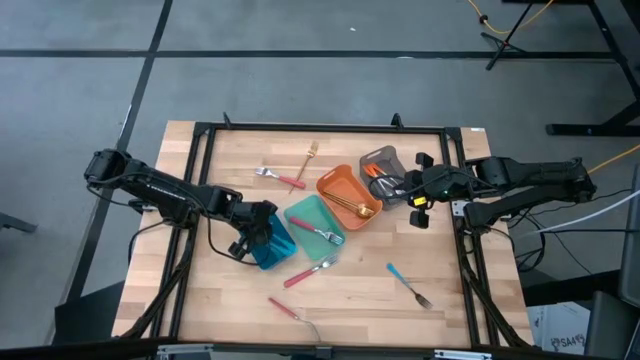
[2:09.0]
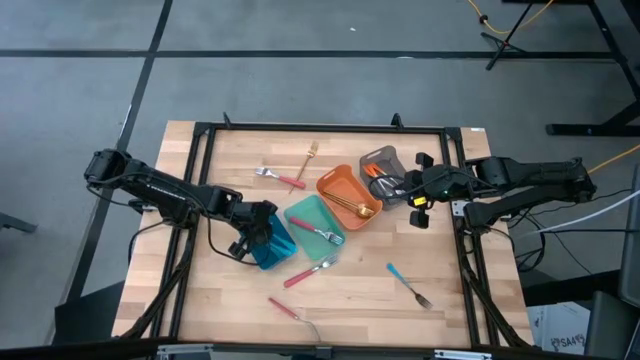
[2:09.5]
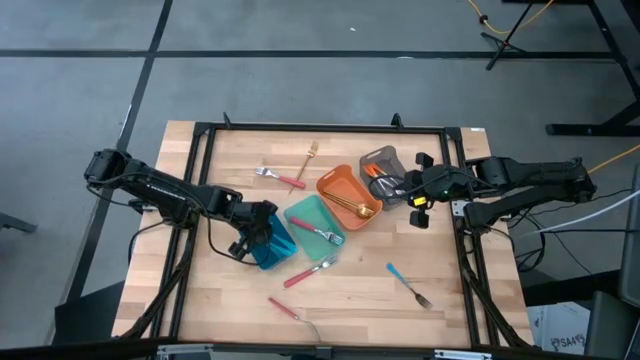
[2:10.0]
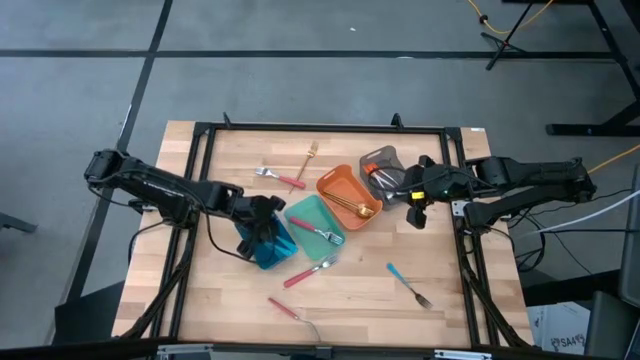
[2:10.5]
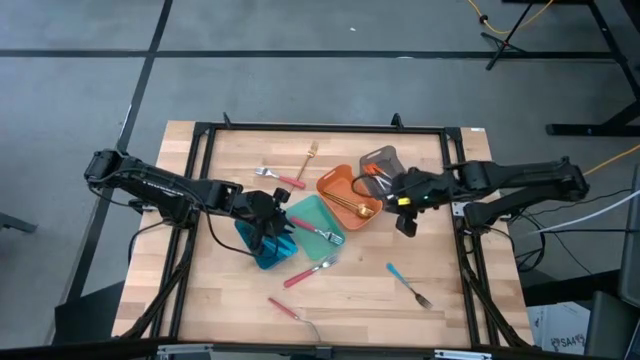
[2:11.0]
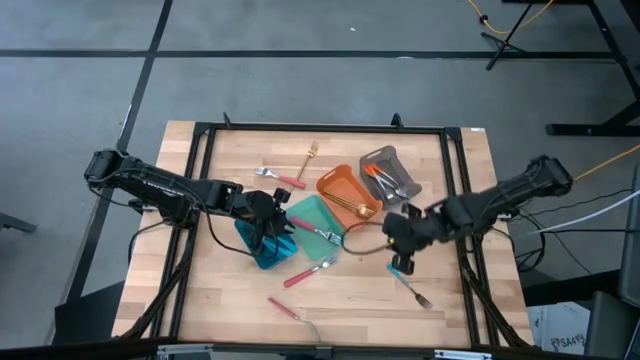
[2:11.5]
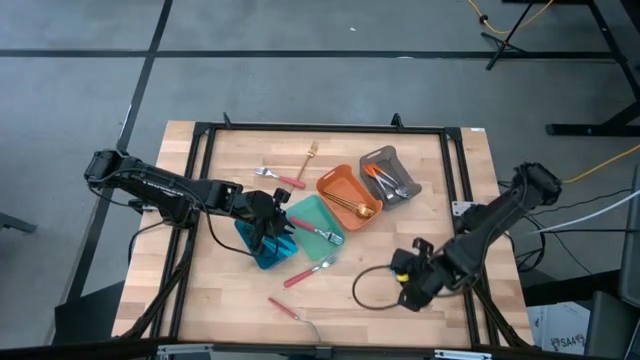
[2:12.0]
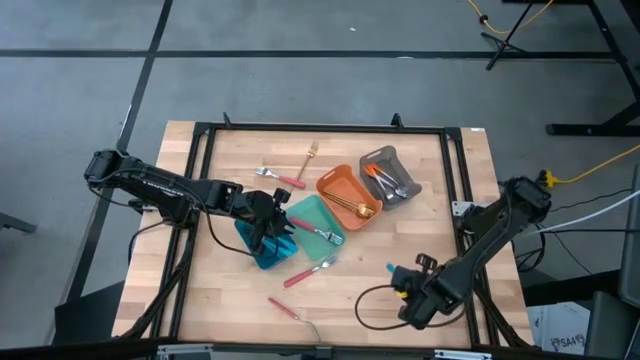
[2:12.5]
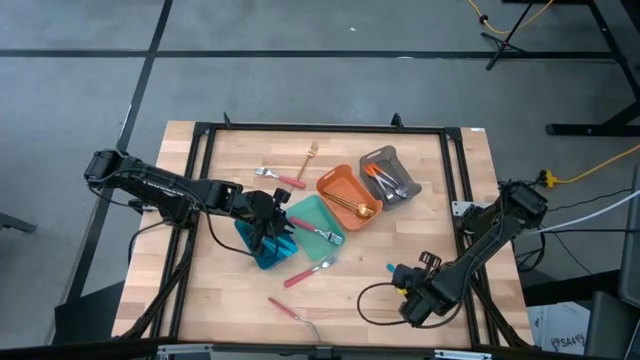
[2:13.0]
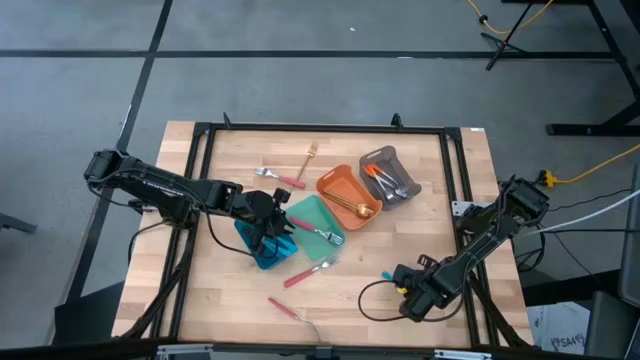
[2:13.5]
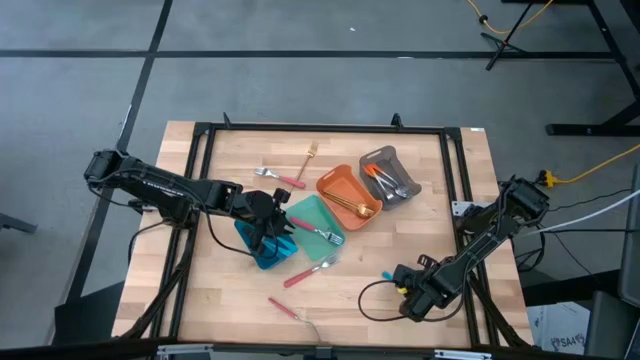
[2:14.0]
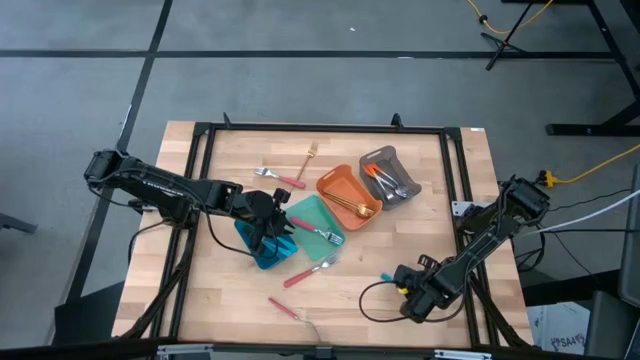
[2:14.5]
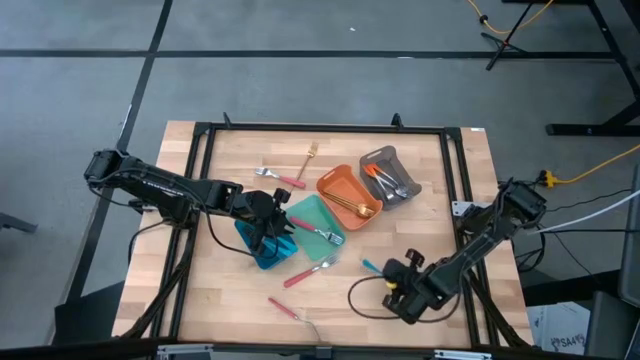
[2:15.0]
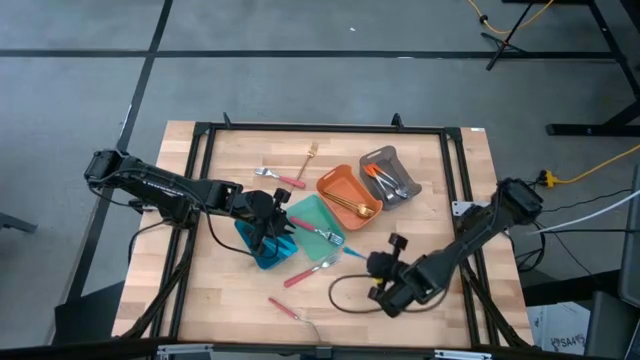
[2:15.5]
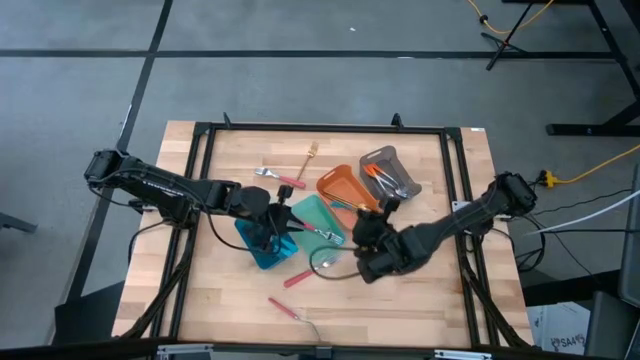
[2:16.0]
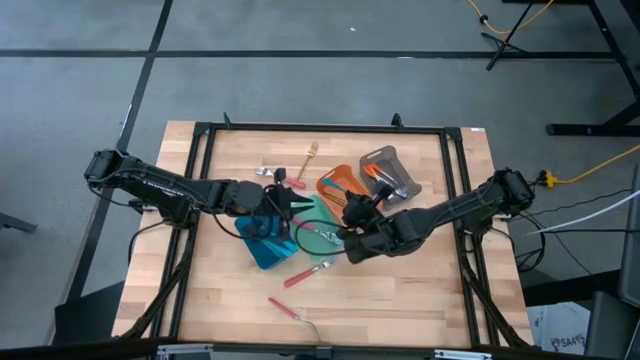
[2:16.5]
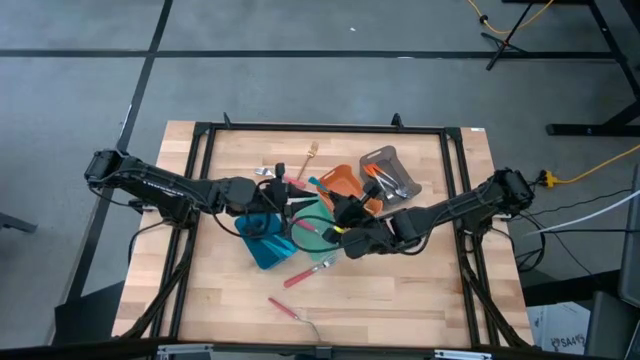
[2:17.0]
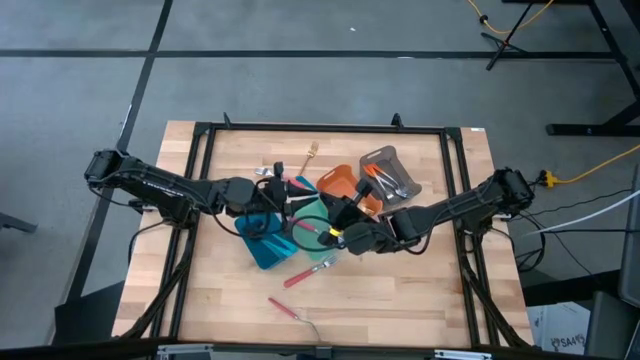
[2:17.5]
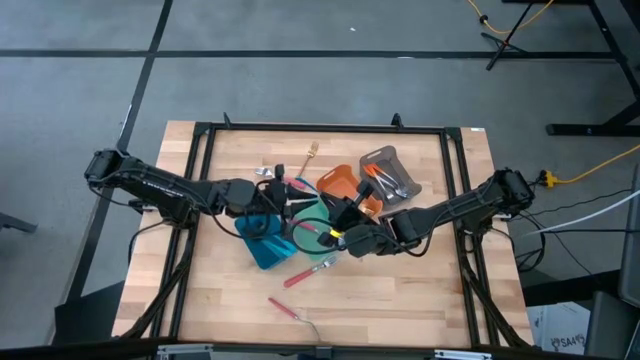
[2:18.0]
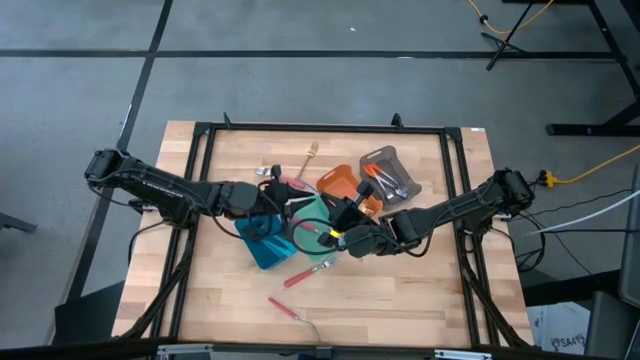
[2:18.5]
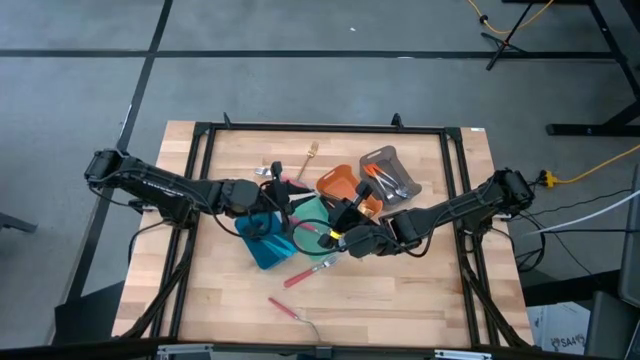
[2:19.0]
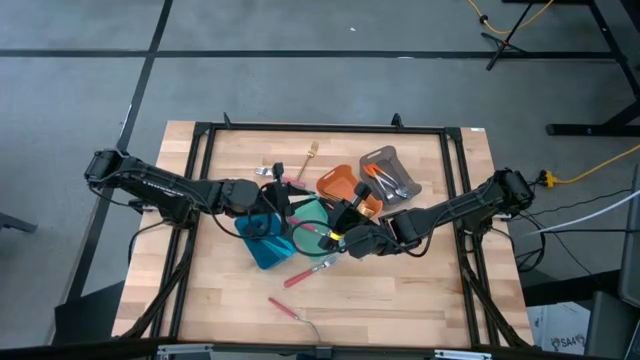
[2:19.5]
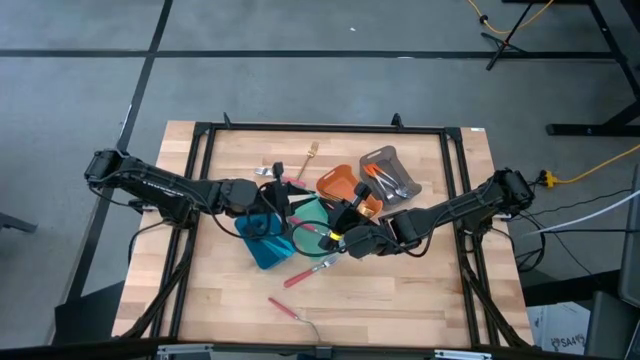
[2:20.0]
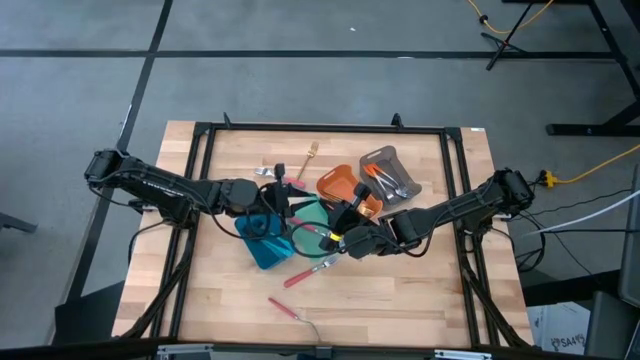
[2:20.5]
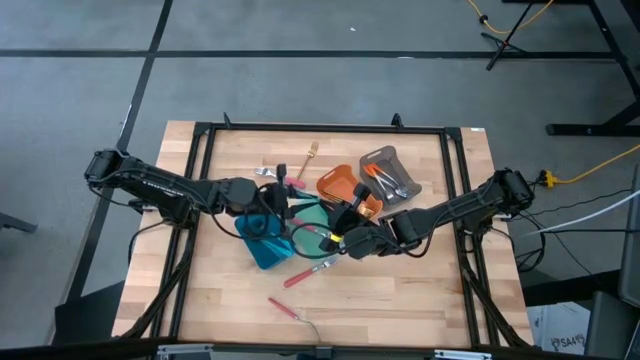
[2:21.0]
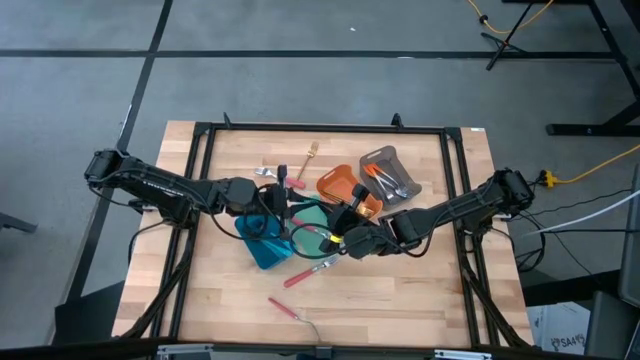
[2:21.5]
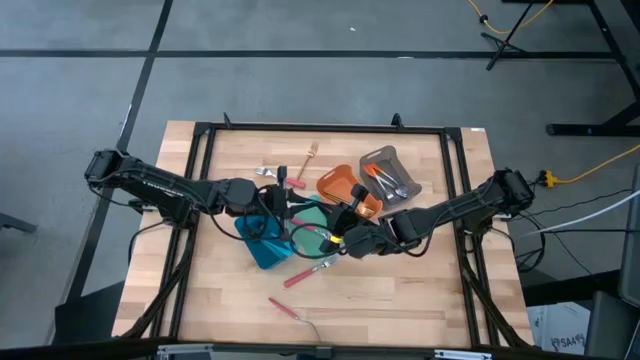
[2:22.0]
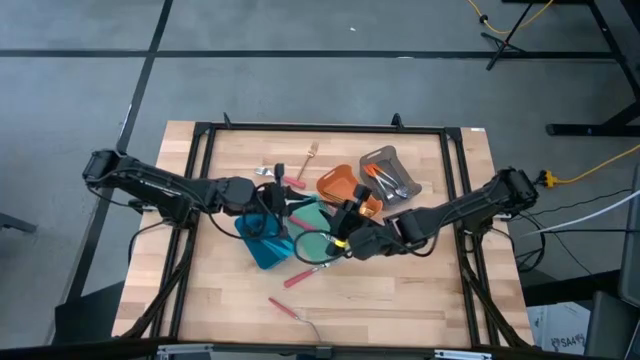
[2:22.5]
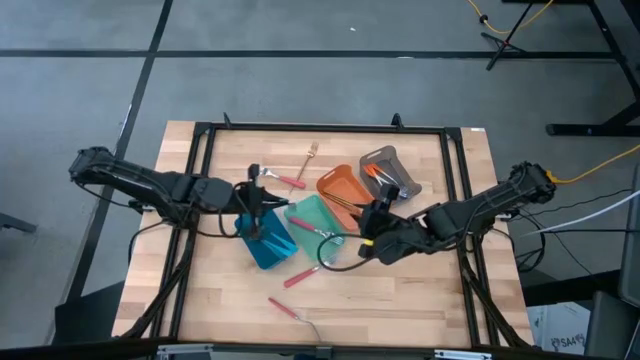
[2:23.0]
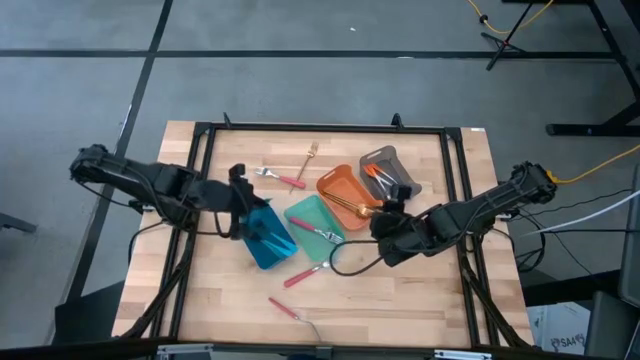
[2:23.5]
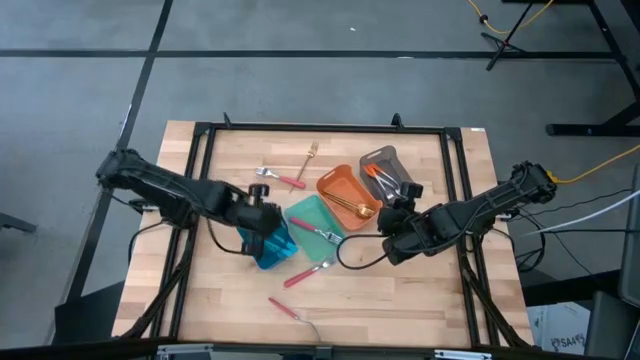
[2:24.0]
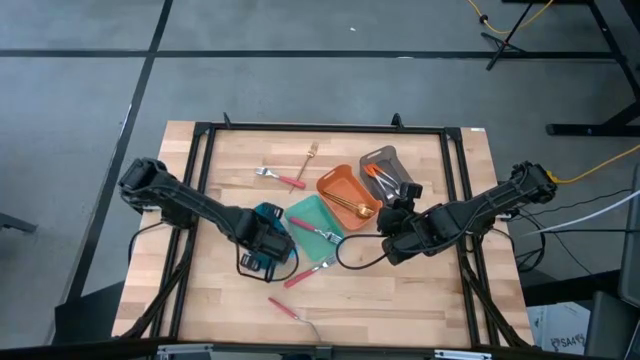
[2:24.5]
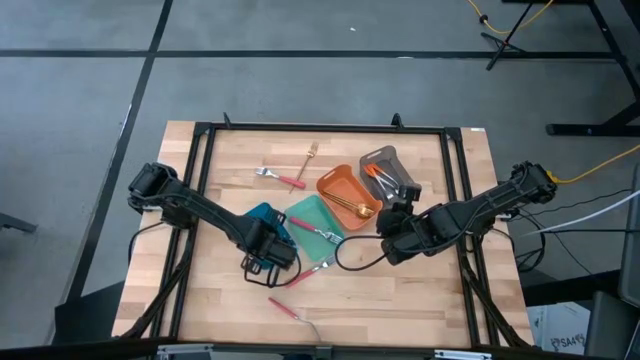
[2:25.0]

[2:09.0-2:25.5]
Task: Sort silverware by color (type)
Put the blue fork into the blue bin

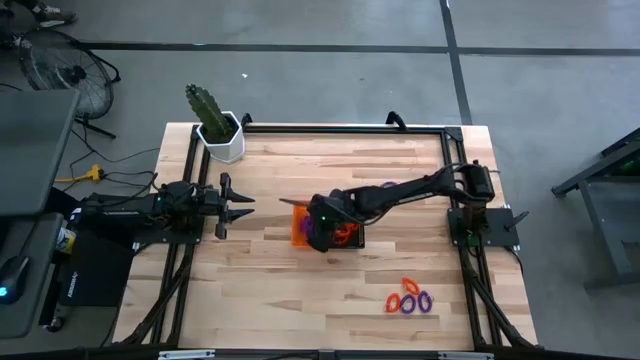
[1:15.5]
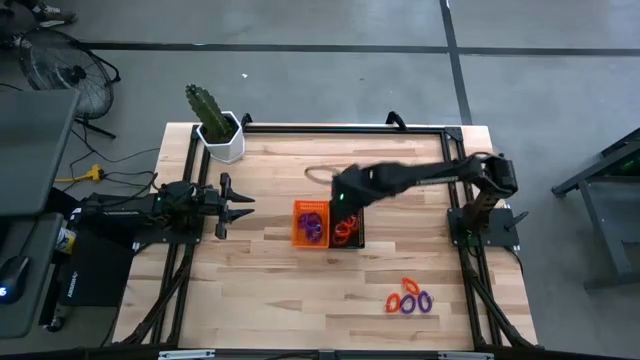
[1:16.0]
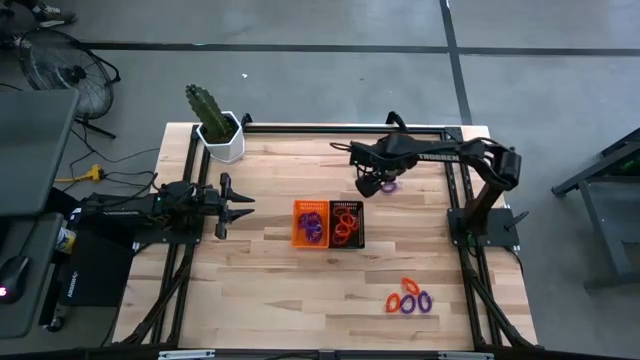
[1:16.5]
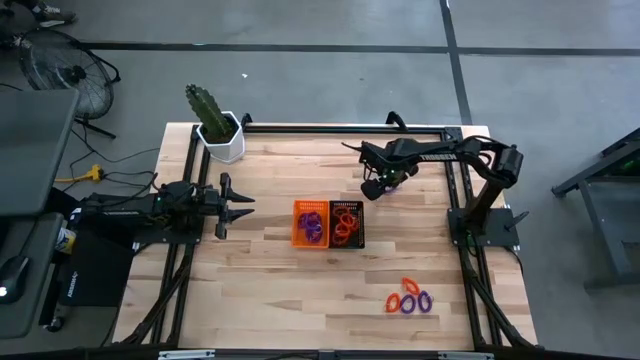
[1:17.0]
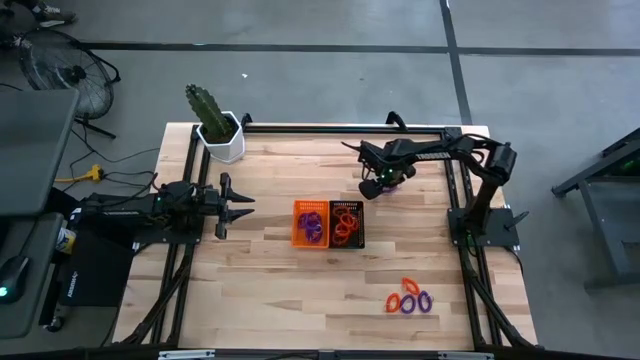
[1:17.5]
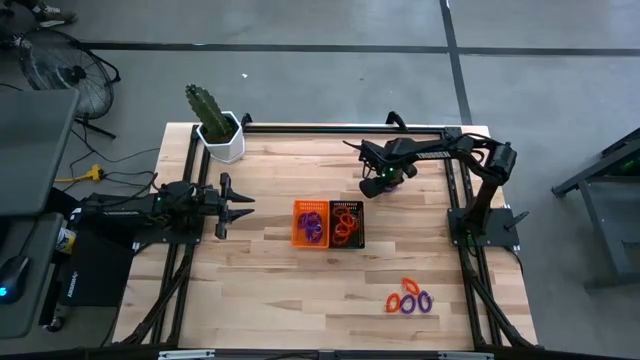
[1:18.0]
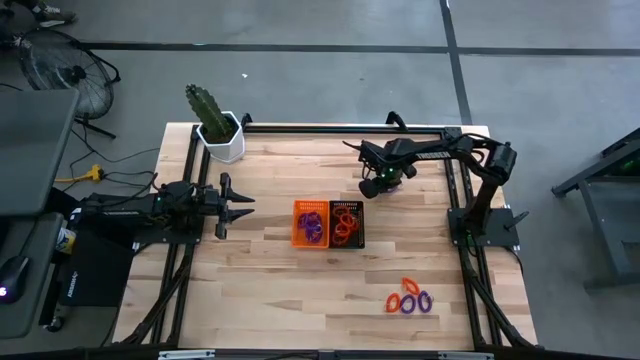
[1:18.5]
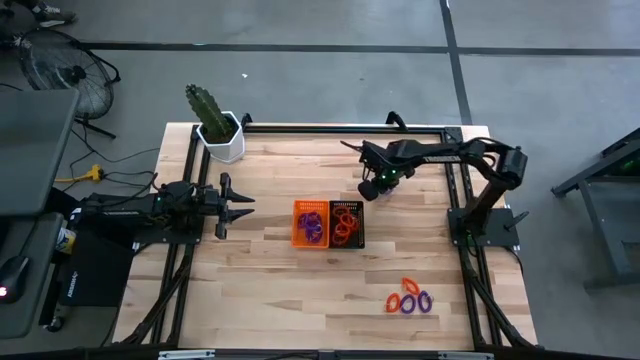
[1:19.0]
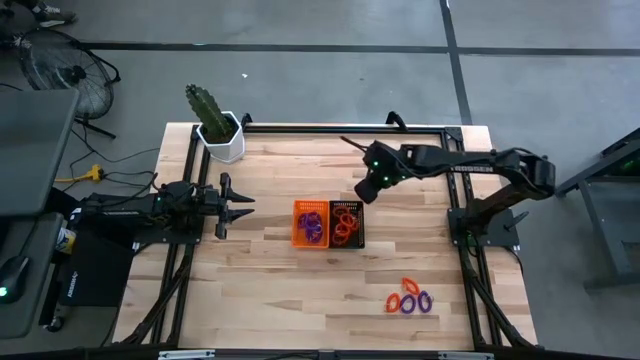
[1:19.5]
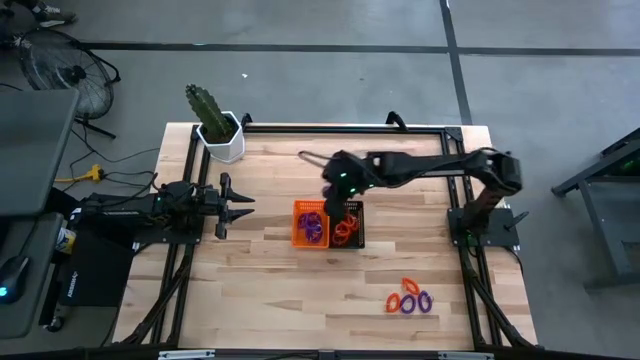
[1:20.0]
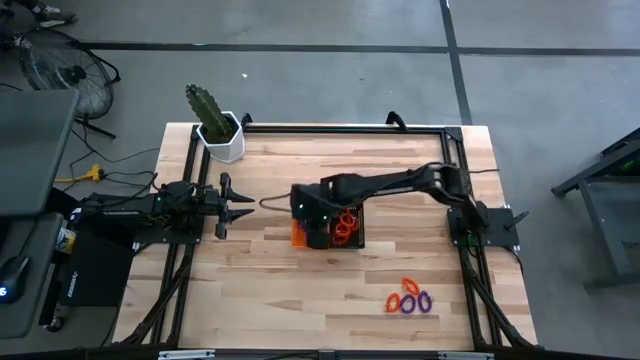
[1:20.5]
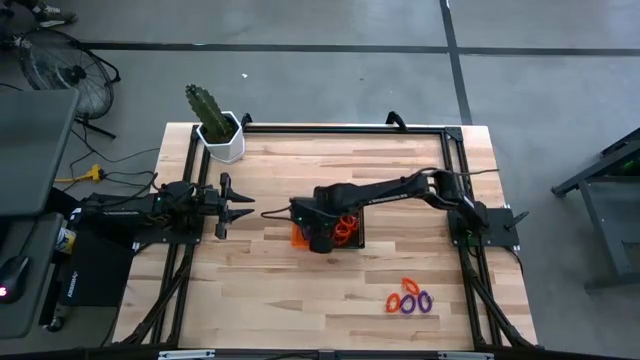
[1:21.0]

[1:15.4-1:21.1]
Task: Sort spring keychains
Put the violet spring keychain into the orange bin
